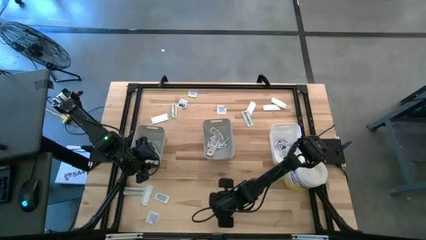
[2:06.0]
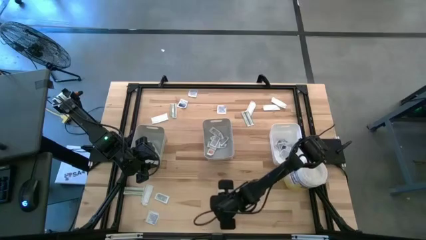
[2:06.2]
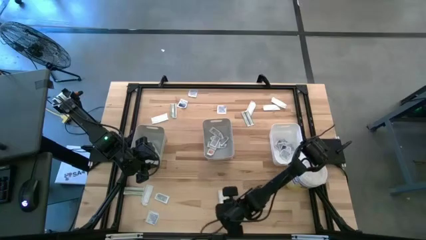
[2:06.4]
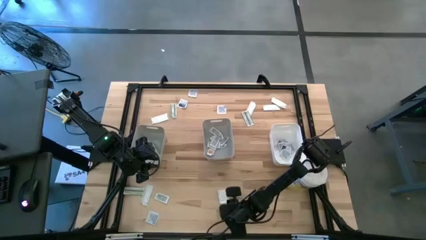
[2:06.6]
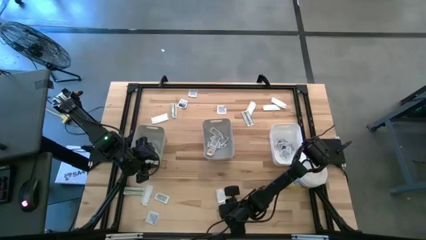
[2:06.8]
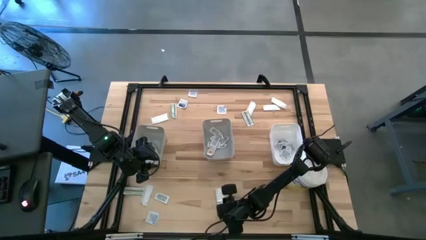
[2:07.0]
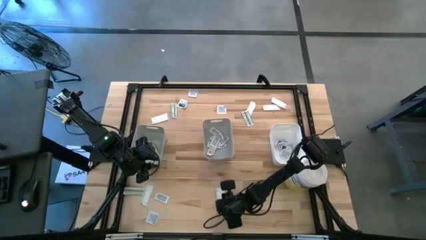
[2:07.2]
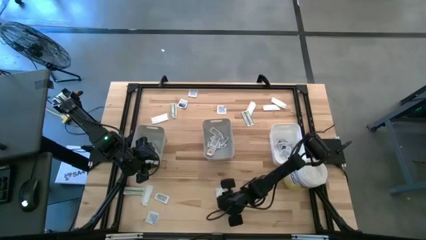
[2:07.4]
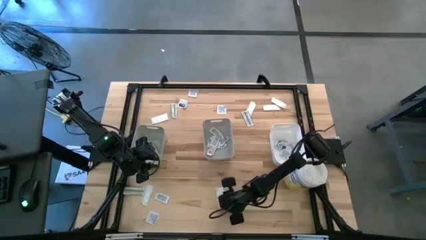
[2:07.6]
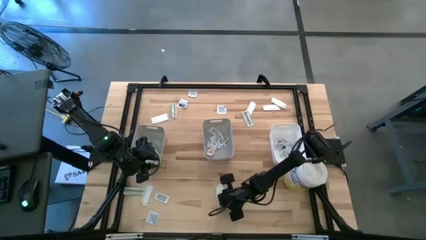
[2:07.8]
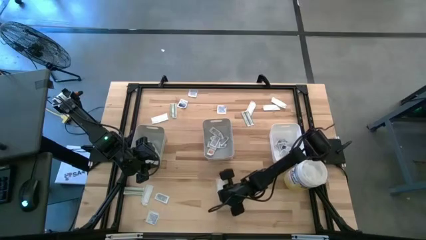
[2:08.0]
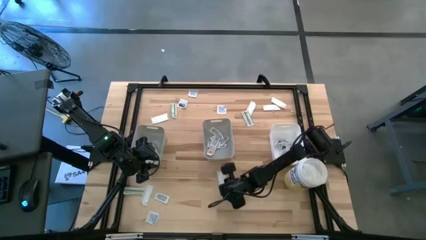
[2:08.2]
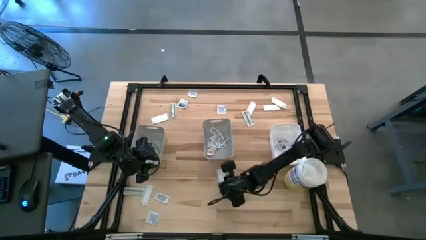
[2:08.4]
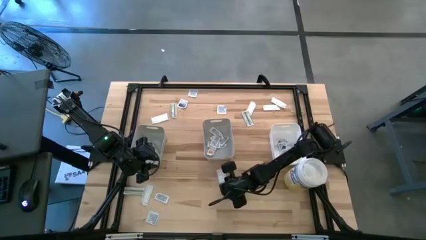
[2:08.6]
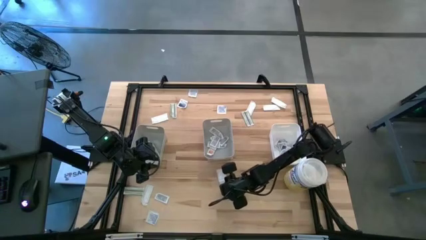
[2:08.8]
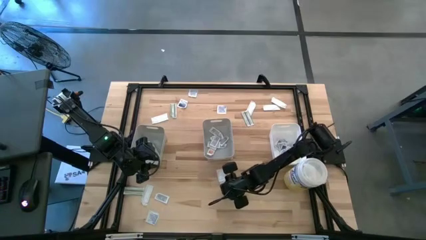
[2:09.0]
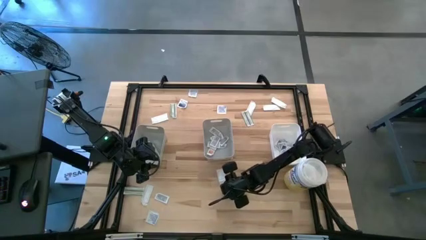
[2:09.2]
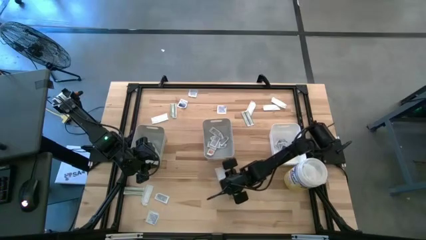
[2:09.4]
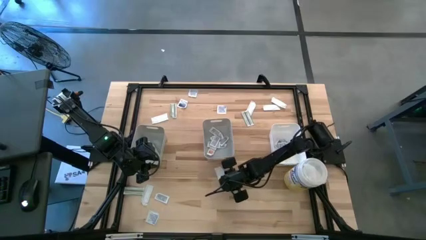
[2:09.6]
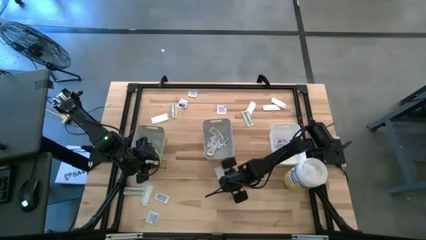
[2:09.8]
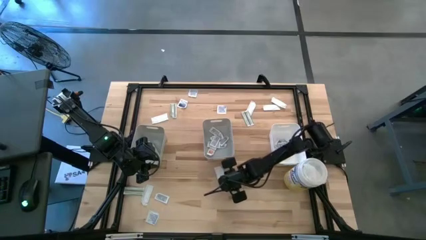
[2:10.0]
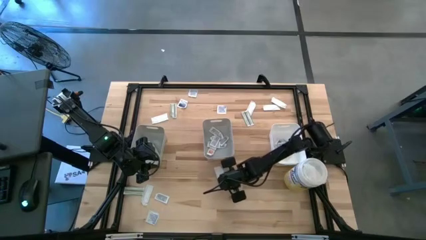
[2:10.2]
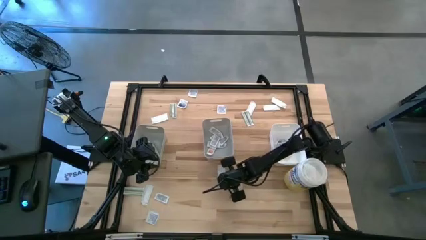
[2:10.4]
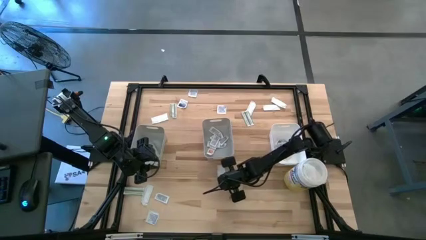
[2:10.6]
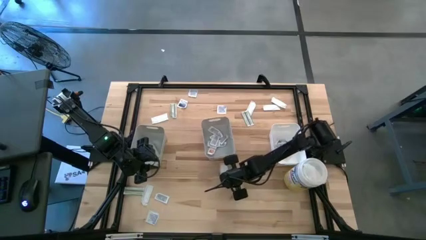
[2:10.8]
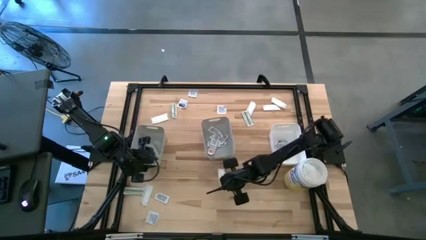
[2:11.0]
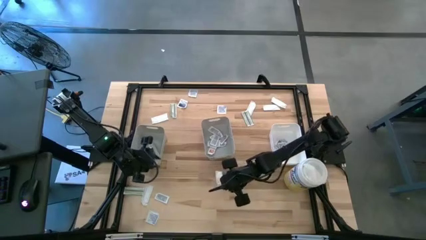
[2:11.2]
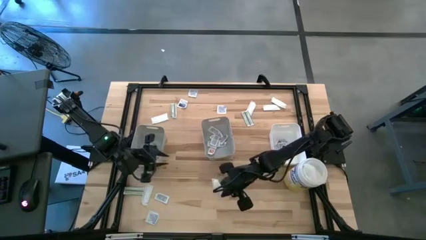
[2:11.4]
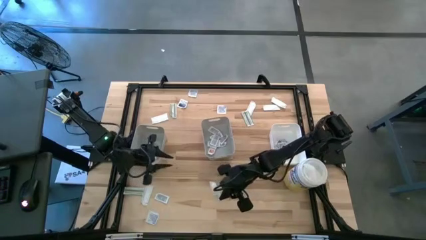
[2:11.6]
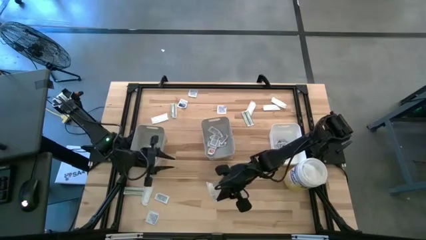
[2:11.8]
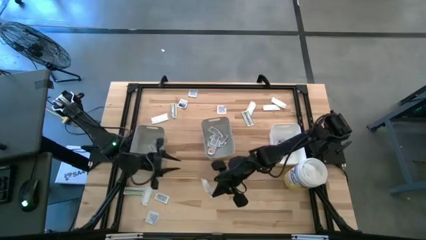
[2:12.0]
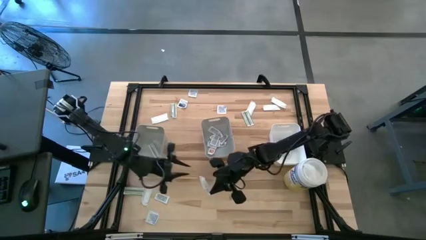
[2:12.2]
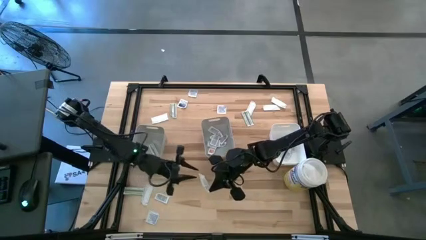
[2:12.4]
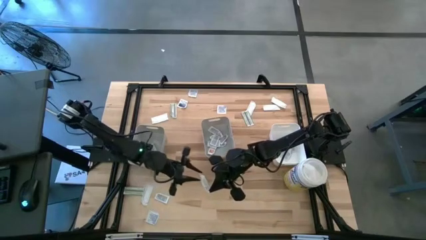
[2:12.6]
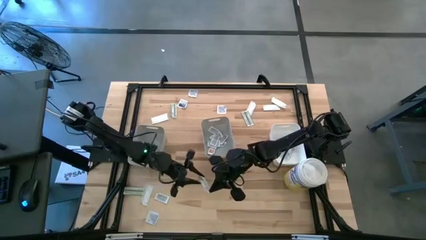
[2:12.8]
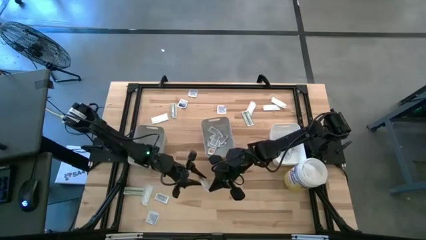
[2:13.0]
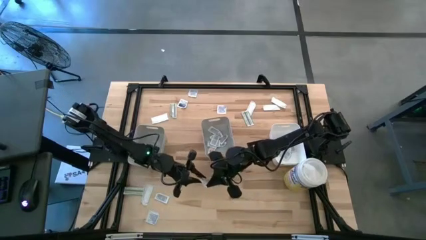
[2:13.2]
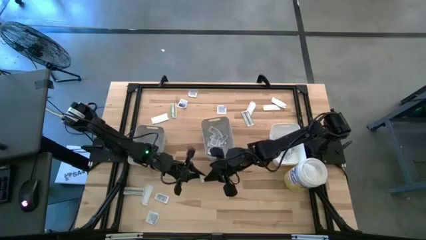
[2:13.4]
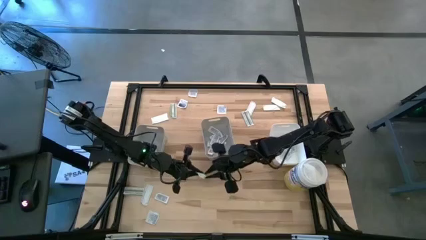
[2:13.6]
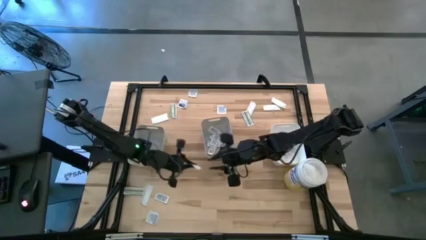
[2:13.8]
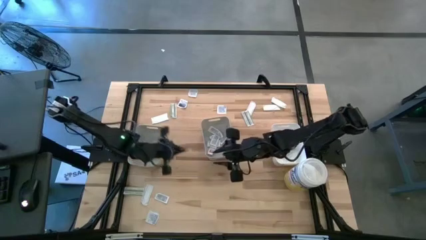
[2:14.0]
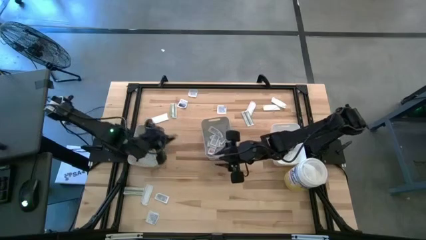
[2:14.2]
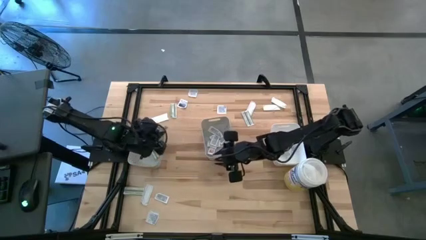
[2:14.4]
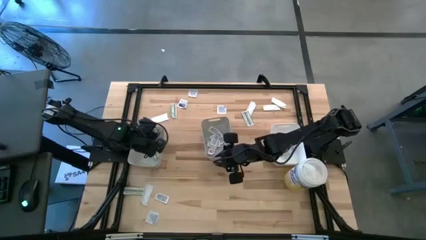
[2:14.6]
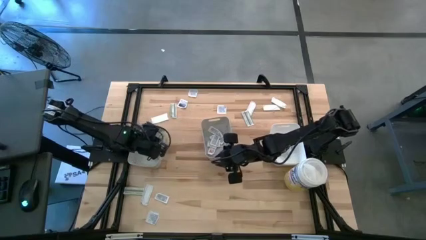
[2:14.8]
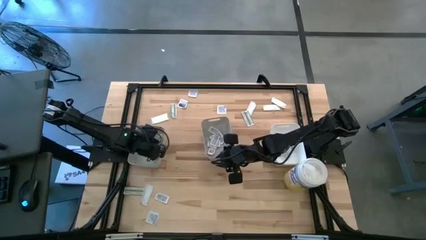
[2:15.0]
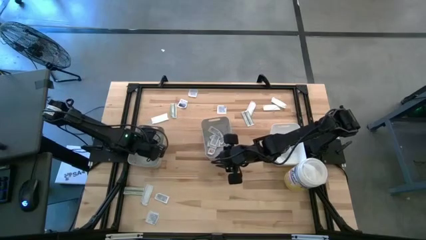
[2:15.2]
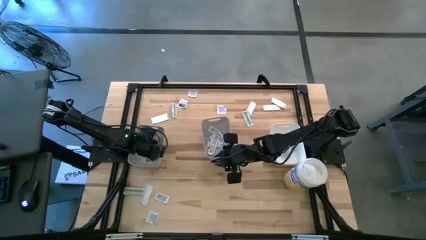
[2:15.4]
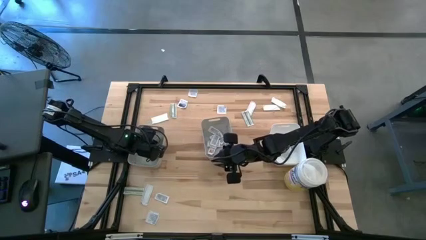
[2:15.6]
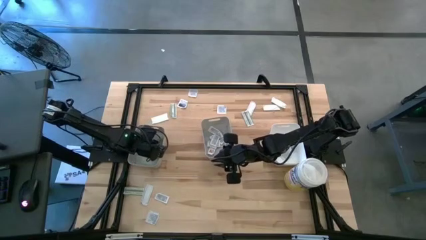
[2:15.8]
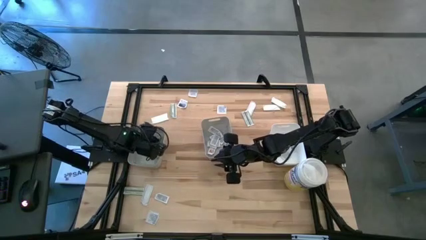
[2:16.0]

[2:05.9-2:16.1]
Task: Pick & Place First Aid Supplies
Put the bandage pack into the left gray bin

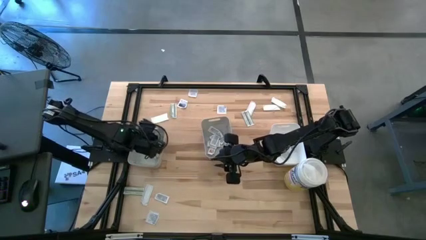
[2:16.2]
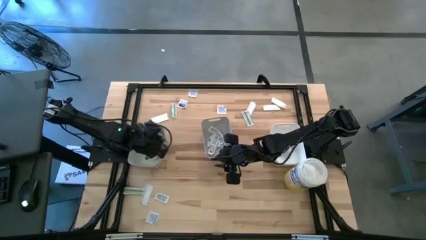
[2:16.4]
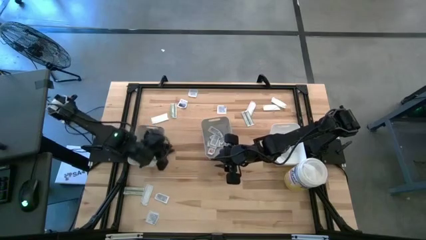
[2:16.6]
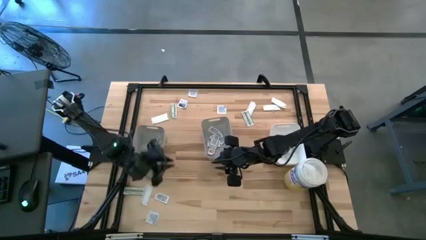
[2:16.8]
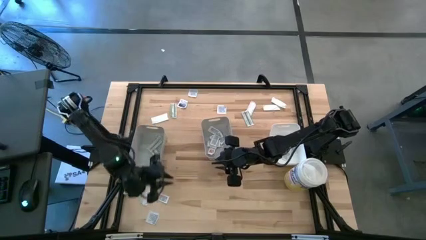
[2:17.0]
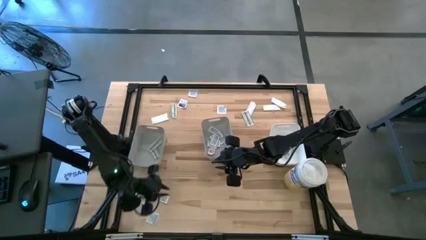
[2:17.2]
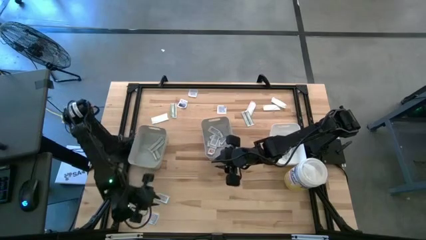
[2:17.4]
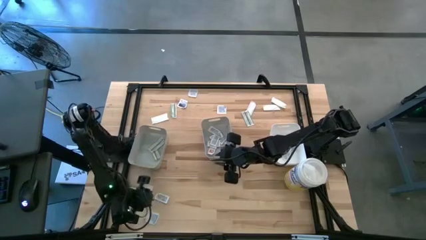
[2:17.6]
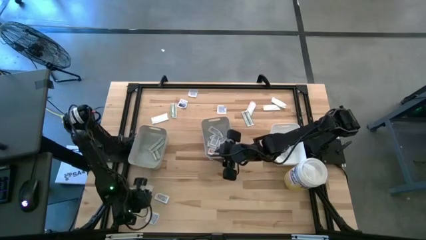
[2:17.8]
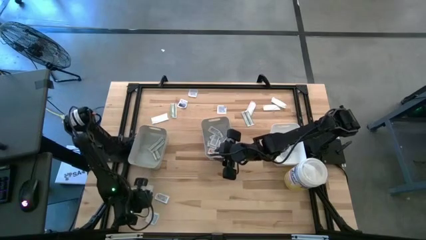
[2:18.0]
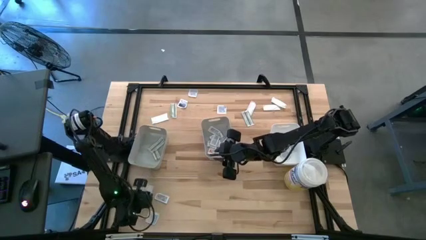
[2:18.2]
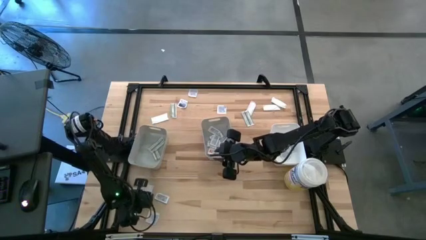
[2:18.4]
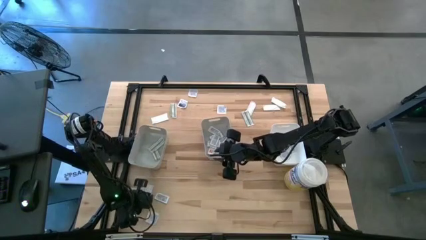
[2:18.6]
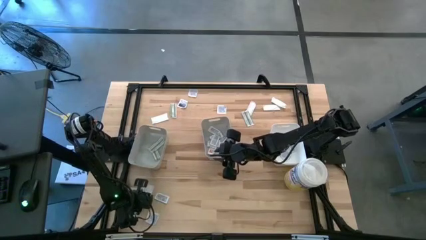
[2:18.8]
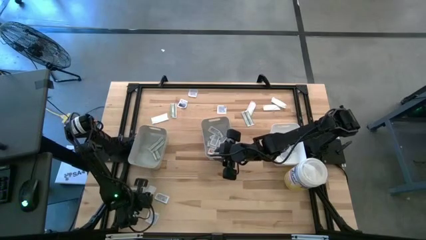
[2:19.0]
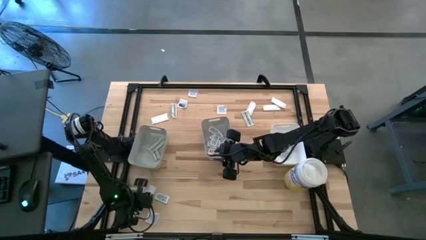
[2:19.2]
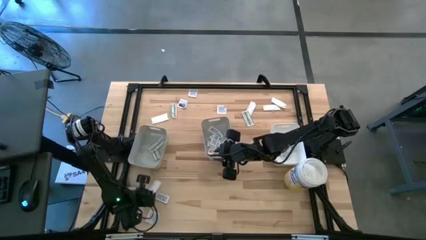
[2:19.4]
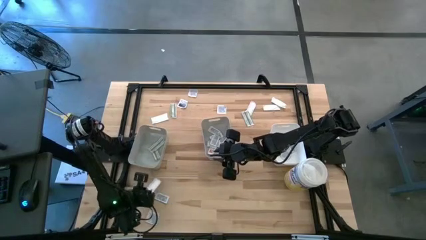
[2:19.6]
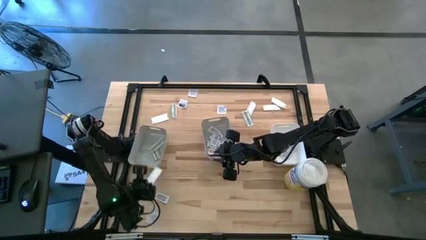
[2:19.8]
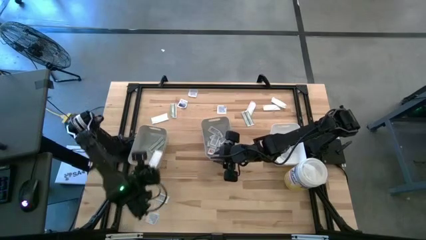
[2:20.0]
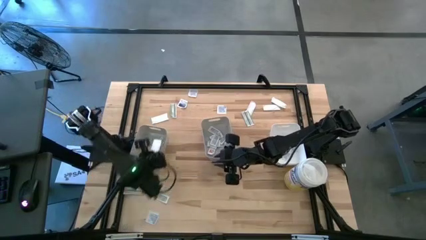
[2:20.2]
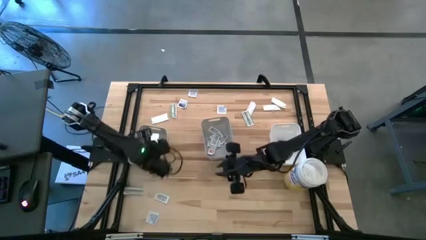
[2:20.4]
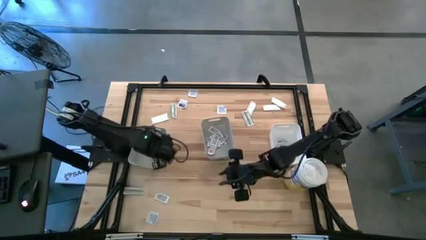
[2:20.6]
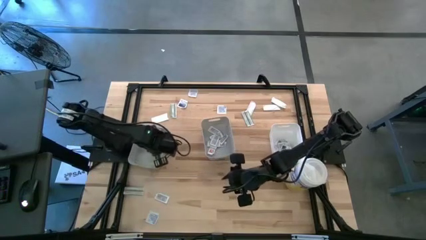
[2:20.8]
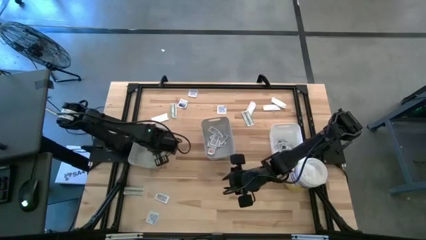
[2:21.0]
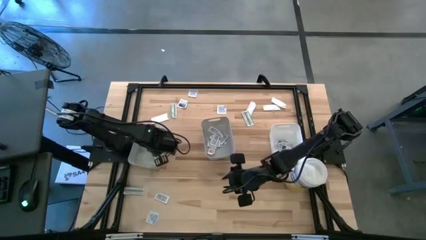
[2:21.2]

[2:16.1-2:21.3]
Put the bandage pack into the left gray bin

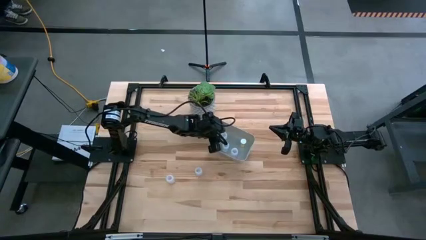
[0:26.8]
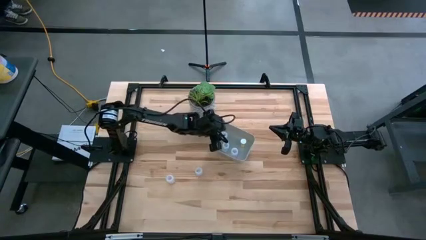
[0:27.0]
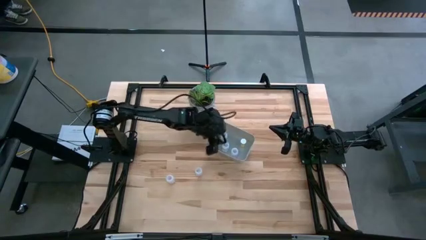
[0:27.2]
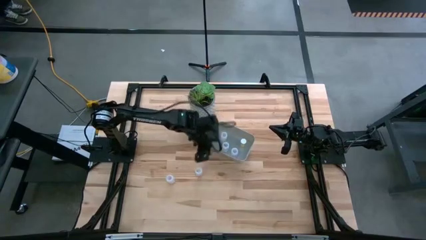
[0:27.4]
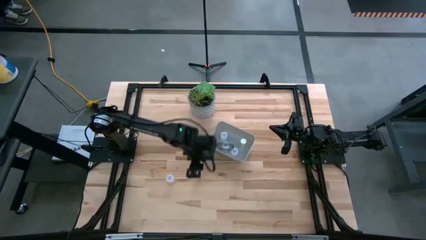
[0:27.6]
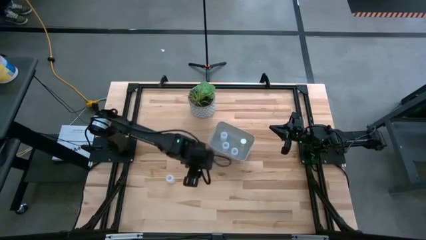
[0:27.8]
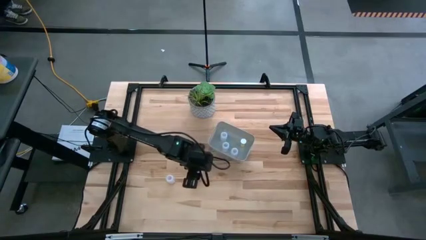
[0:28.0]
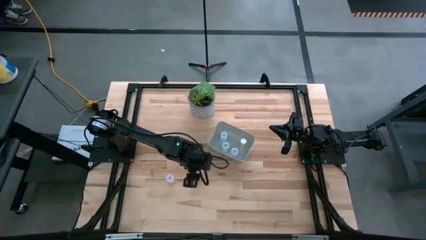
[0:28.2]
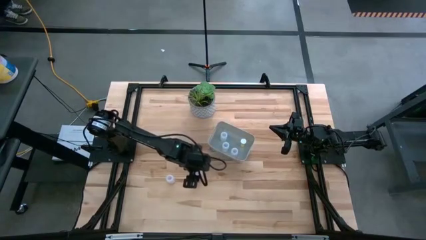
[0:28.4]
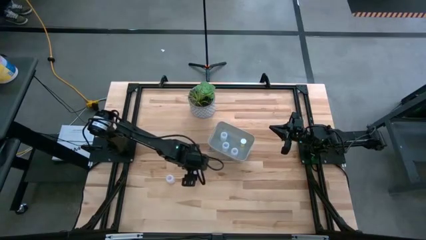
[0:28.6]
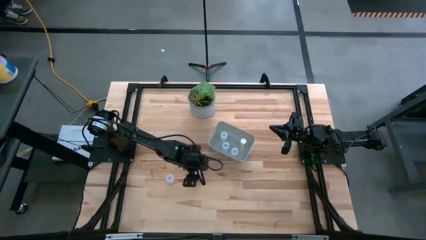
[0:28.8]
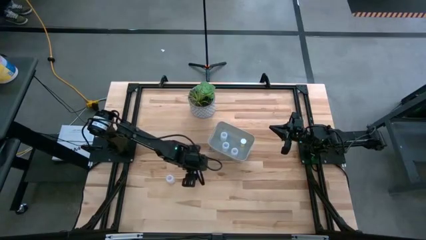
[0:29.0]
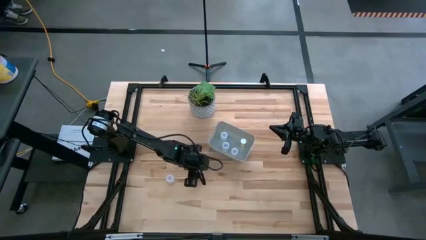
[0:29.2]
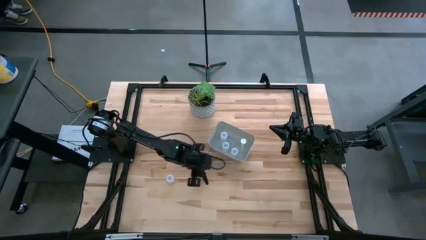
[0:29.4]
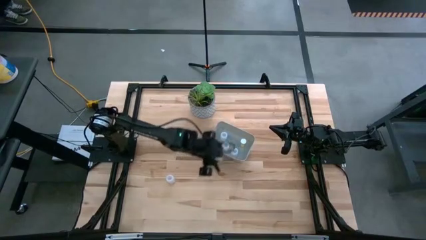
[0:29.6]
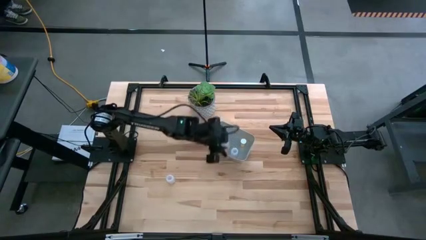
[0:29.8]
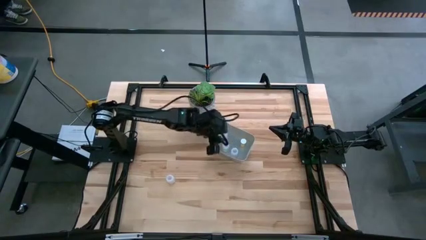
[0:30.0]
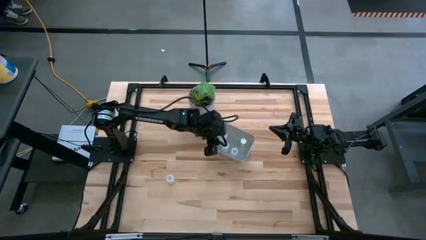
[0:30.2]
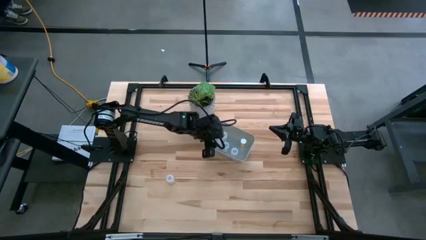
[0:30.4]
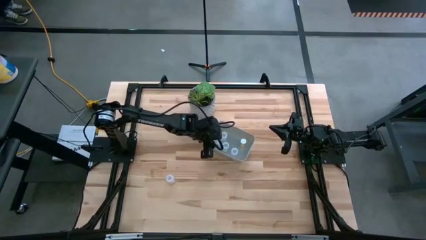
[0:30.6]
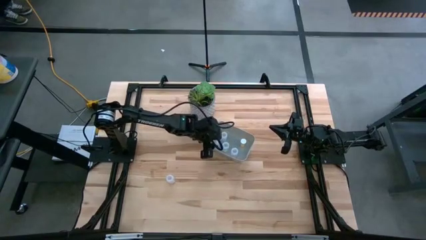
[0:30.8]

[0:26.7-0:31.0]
Task: Pick and place pill bottles into a basket
Put the transparent capsule bottle into the white bin
